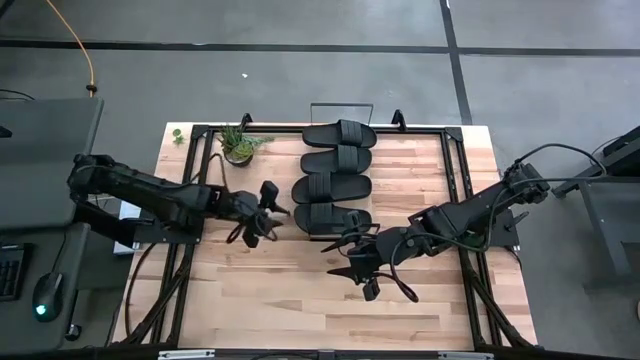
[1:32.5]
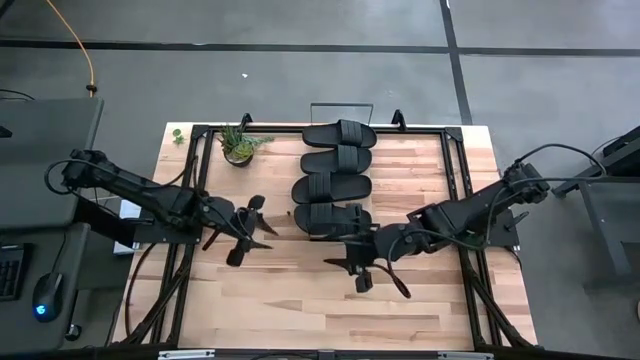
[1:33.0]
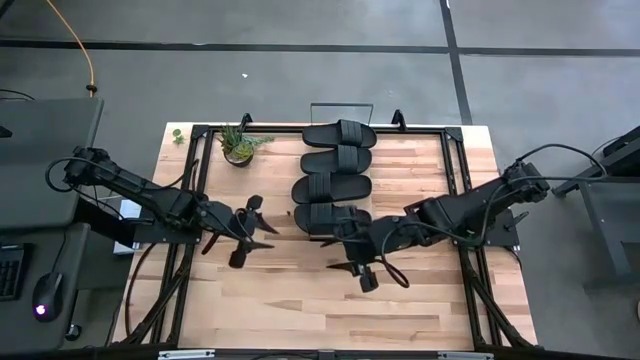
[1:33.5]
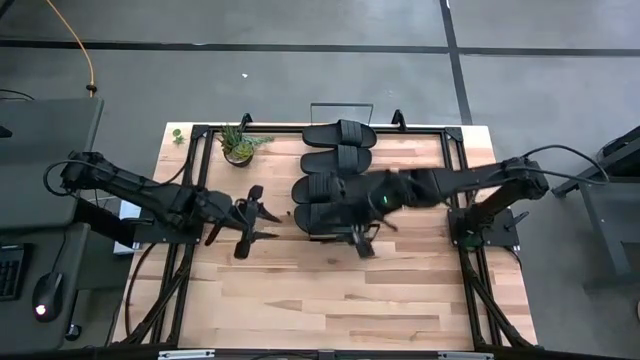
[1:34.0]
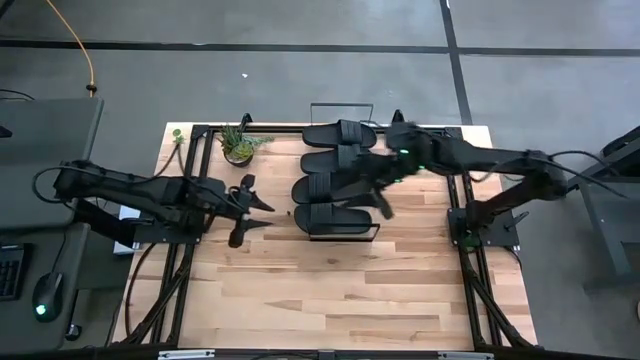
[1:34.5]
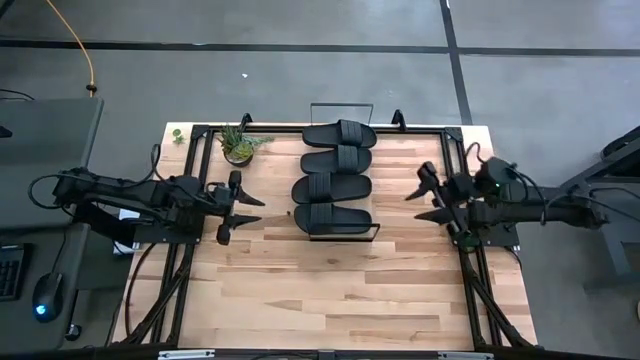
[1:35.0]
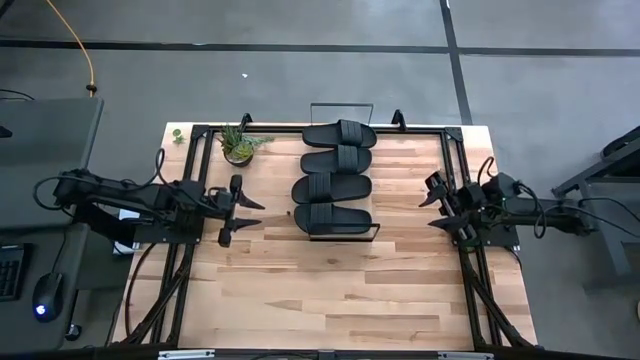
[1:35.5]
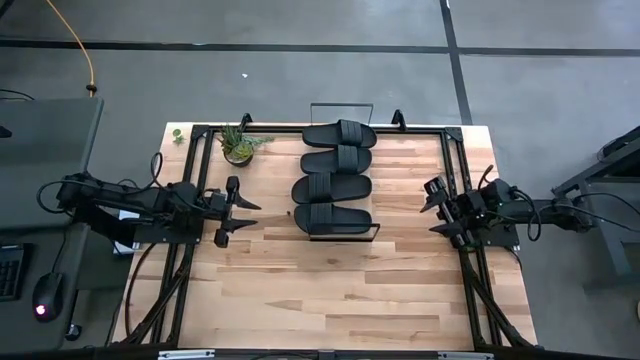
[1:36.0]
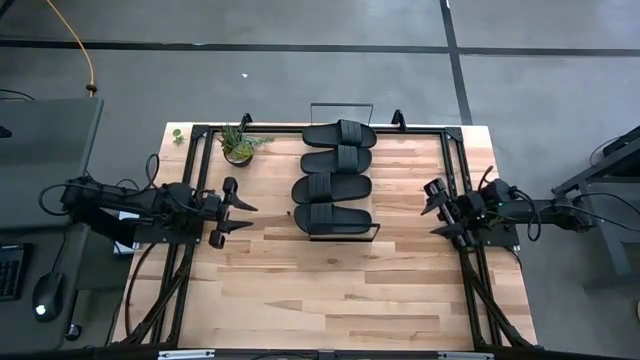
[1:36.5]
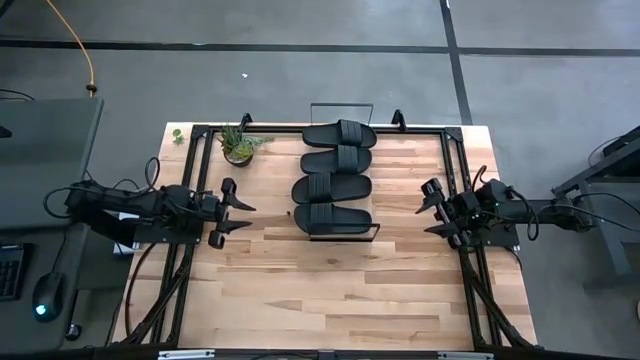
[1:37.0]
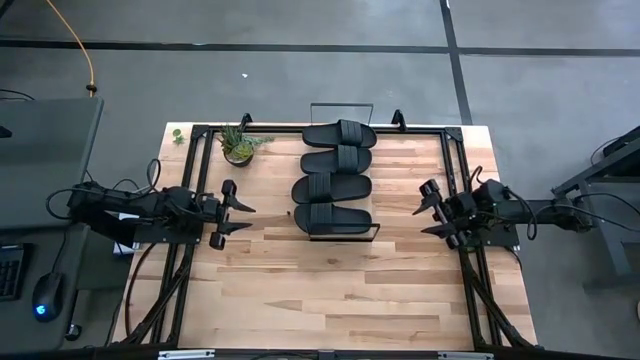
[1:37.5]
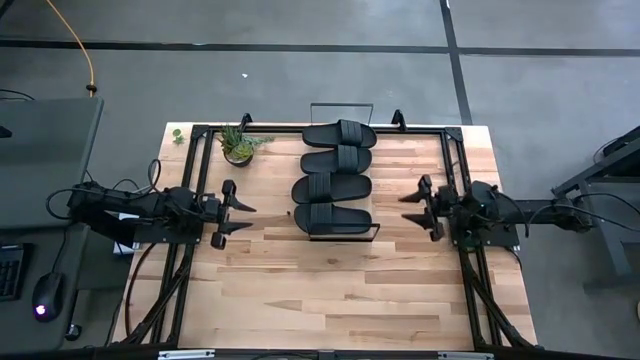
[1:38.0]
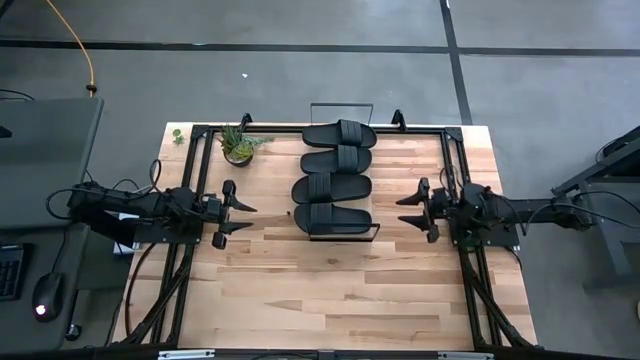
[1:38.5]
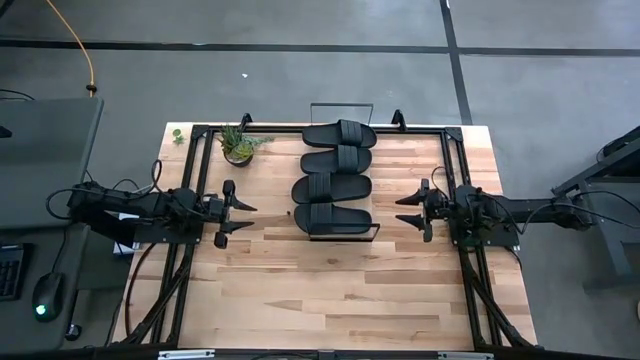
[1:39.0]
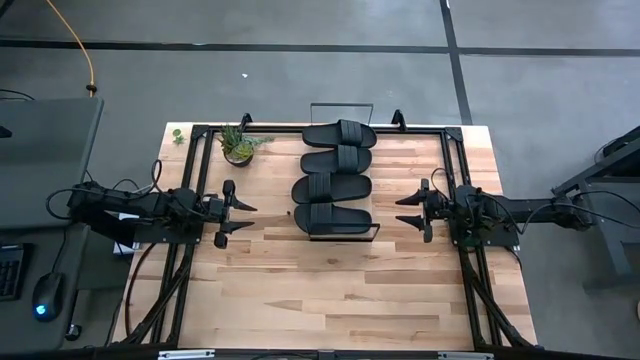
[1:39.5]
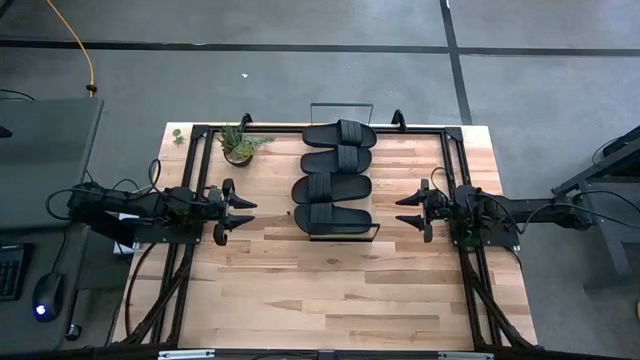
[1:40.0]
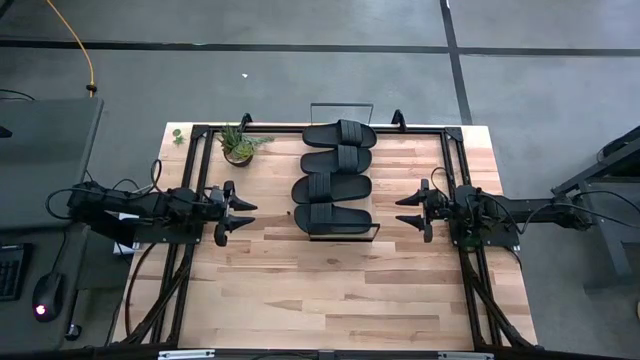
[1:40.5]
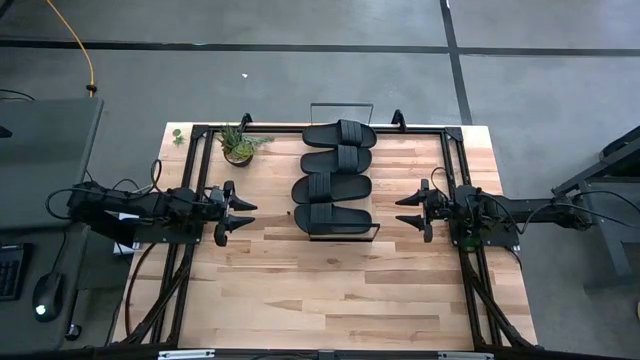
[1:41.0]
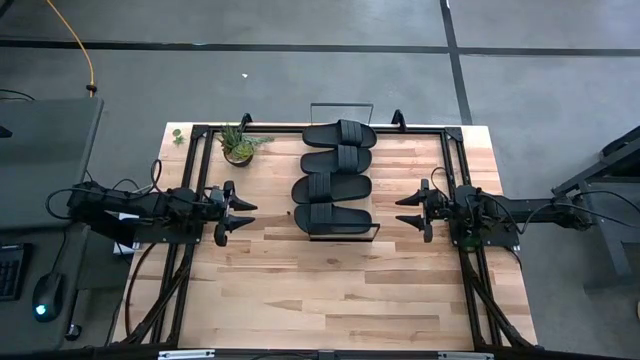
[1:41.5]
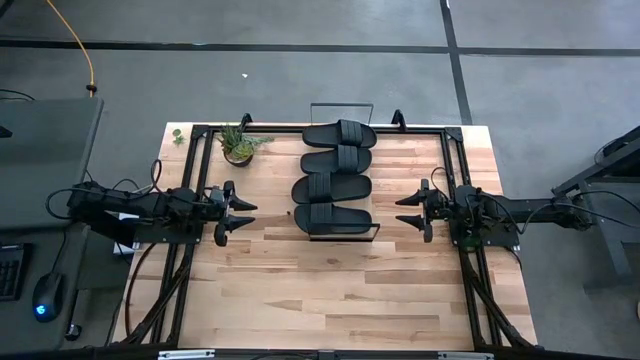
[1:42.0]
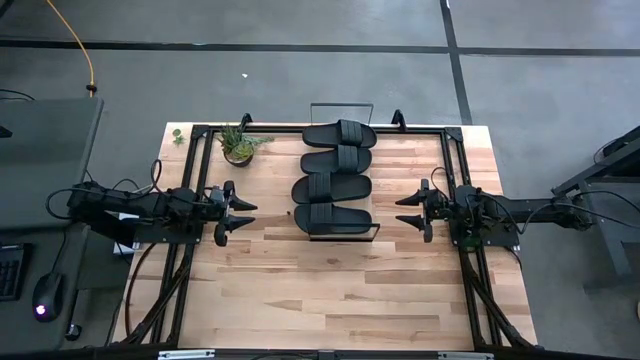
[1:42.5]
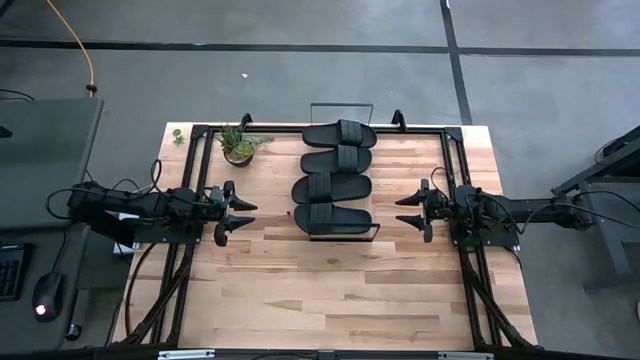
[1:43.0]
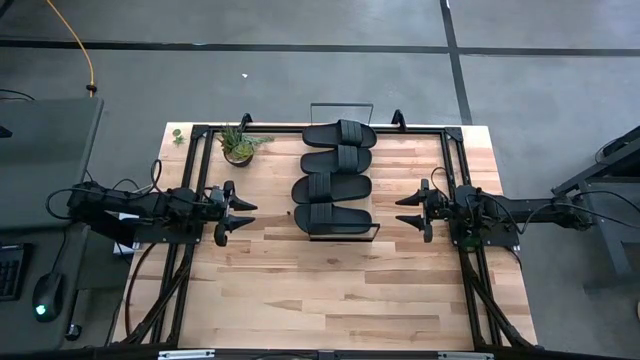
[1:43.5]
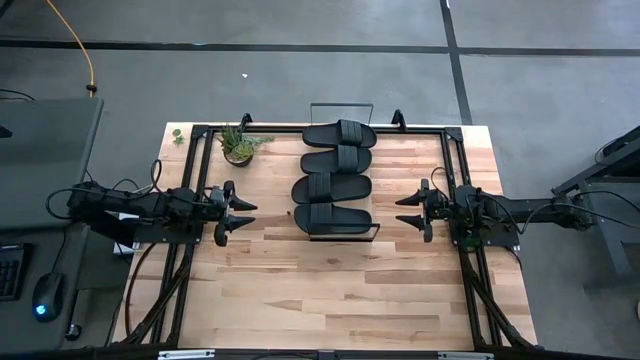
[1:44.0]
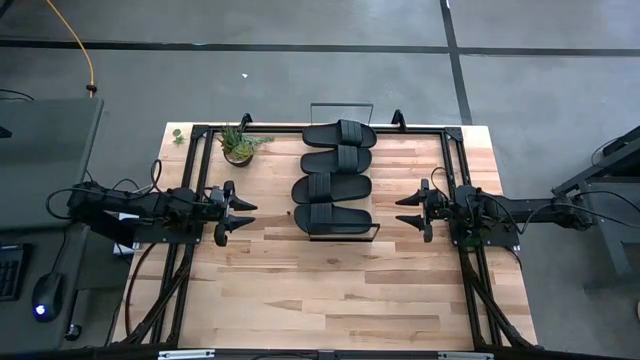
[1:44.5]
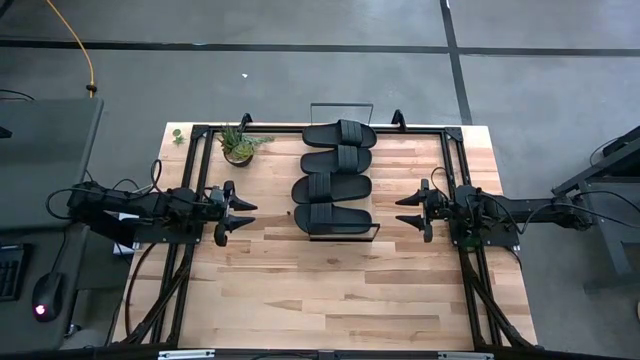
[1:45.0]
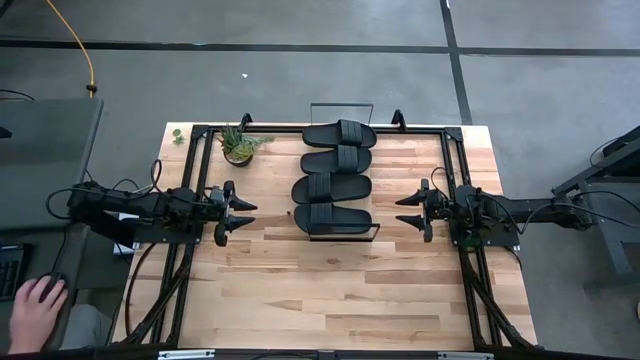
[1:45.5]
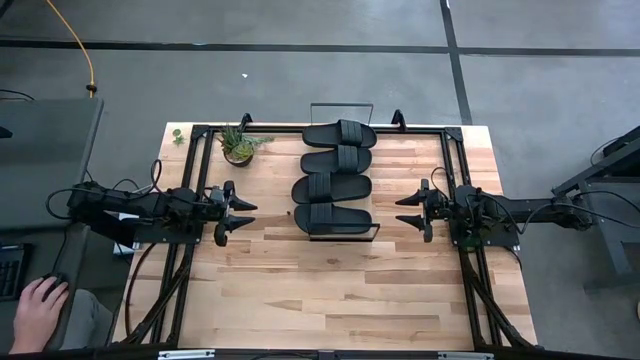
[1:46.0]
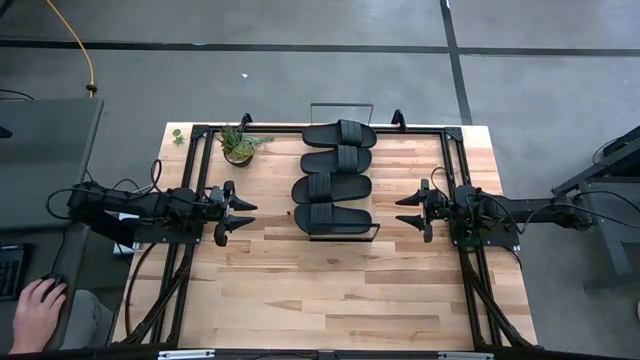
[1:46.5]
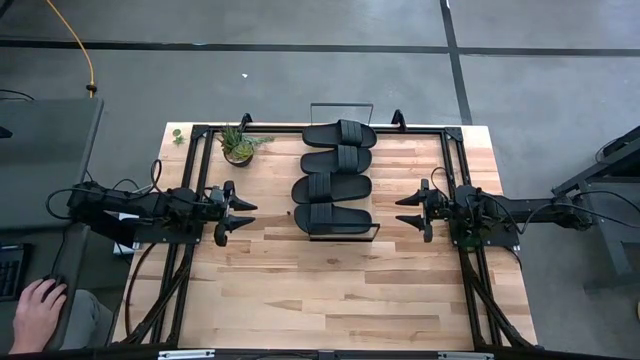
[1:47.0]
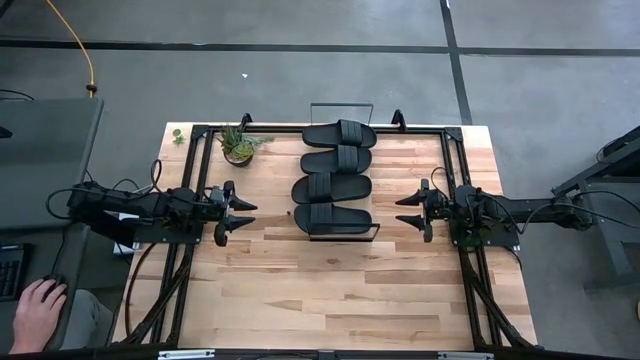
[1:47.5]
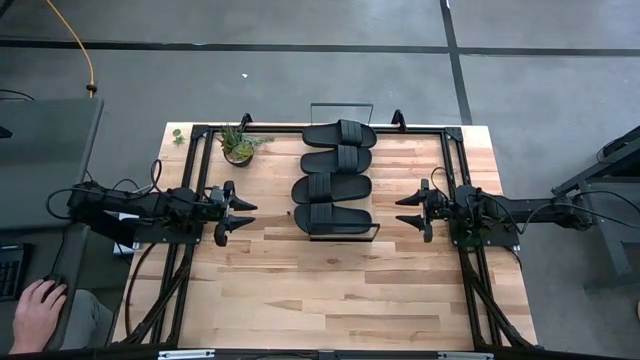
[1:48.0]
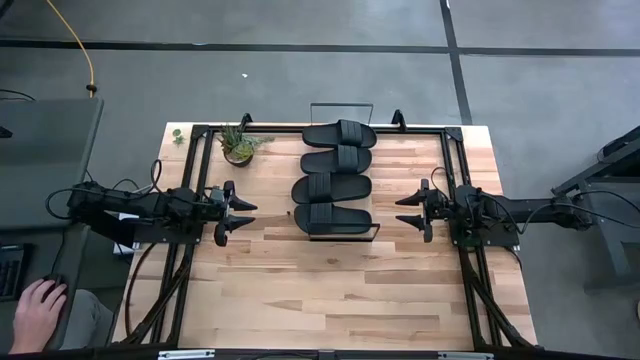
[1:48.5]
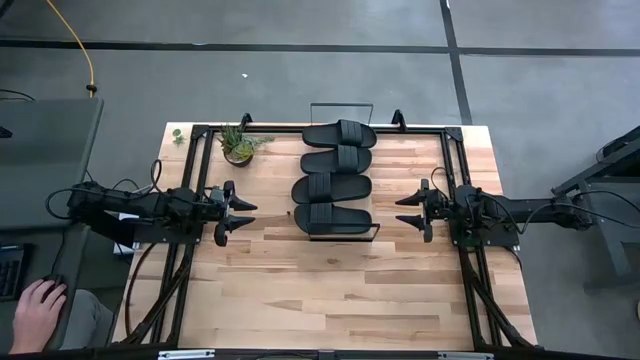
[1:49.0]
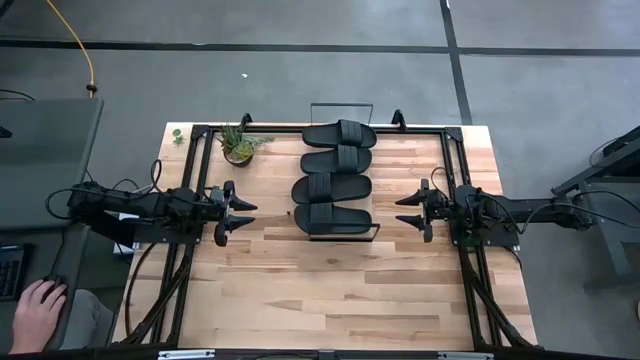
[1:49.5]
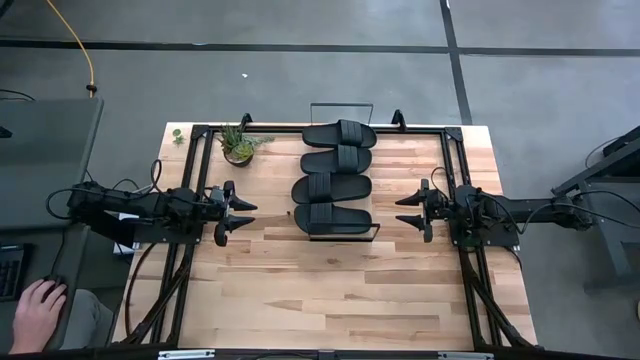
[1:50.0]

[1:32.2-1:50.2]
Task: Pick and place slides into the shelf
Return to Home Position

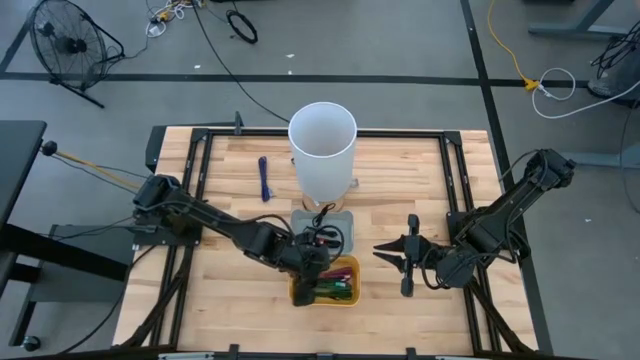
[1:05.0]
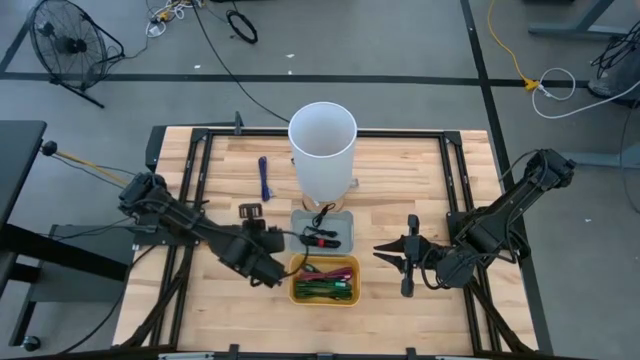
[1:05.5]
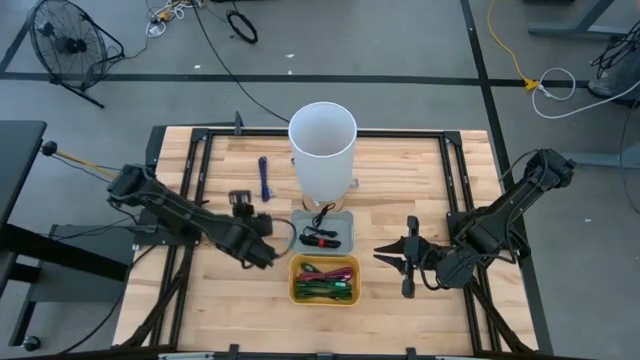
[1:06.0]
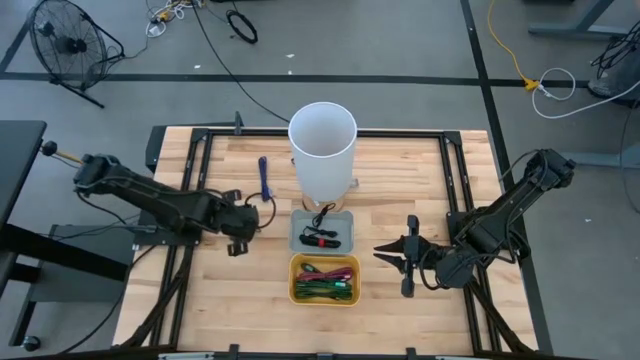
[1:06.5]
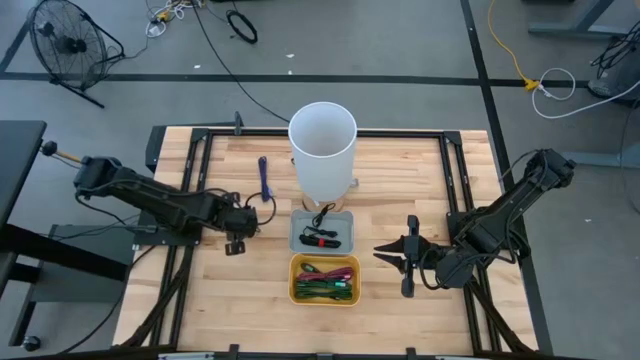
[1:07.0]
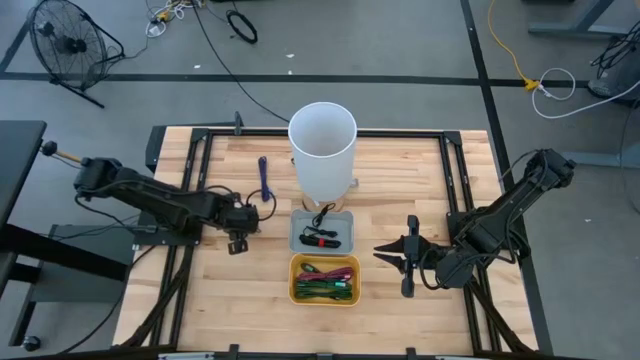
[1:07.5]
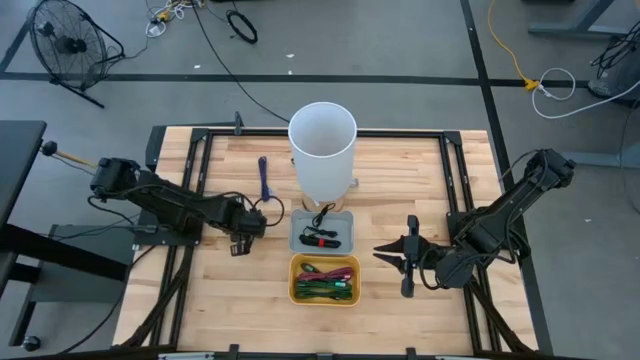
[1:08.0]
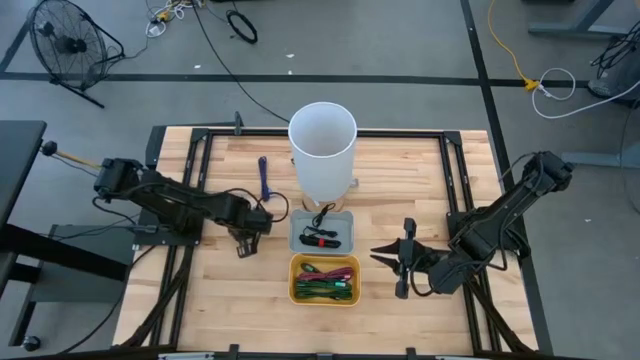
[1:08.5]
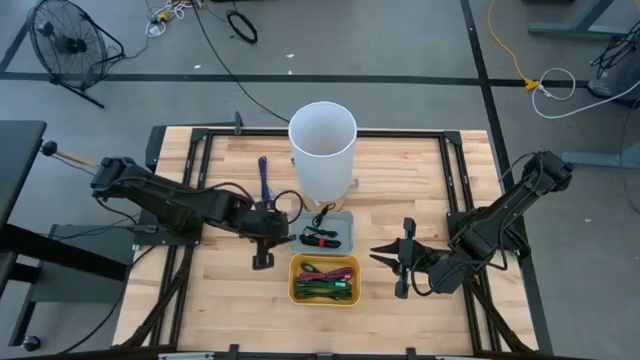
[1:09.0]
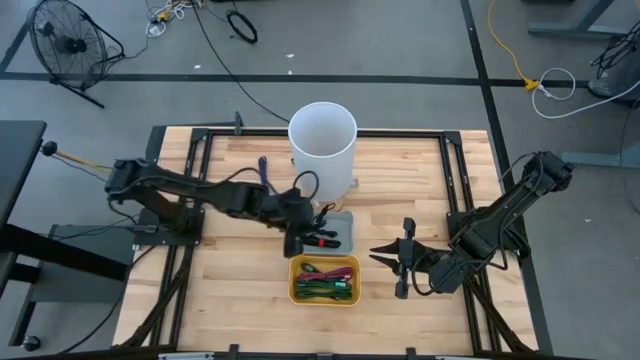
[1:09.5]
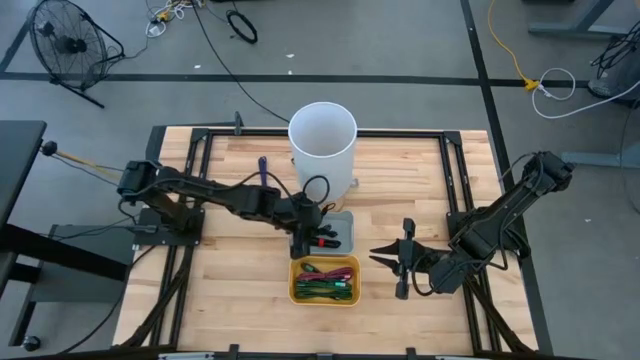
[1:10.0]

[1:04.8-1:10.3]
Task: Pick & Place USB Port
Put the black charger cable into the gray bin
